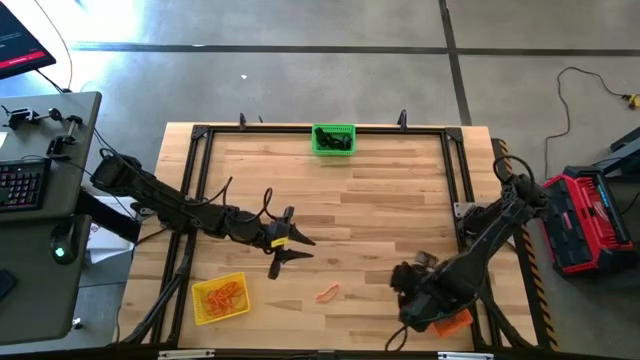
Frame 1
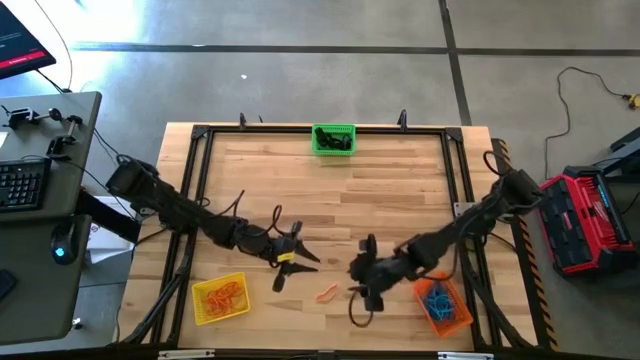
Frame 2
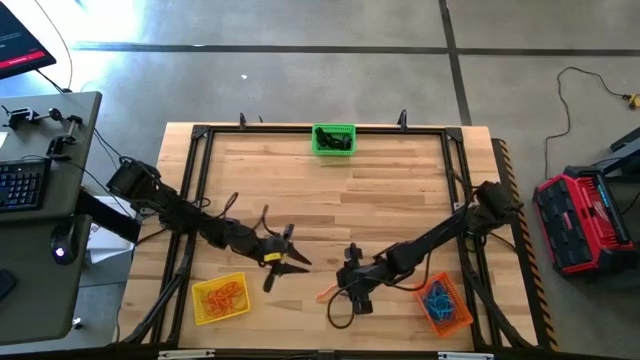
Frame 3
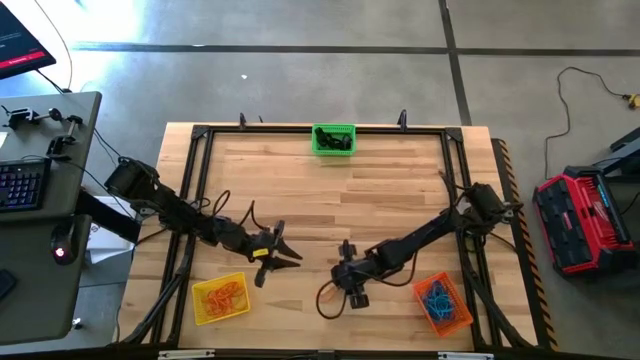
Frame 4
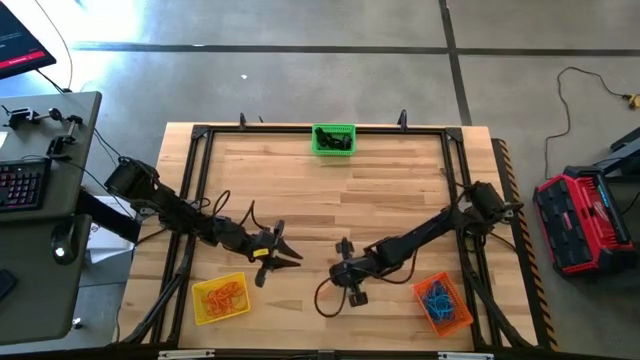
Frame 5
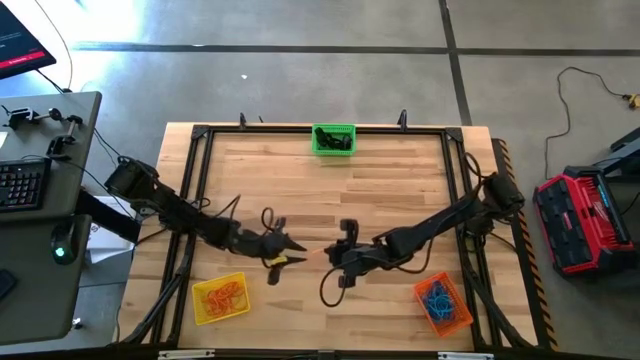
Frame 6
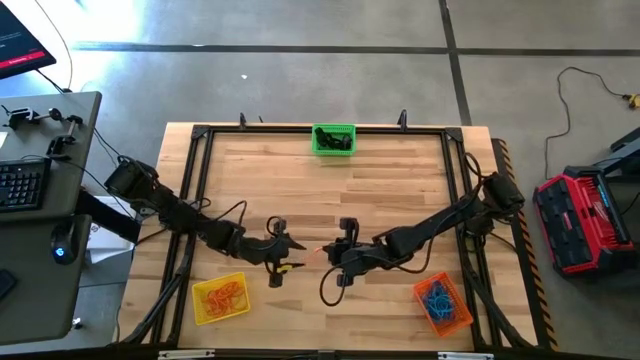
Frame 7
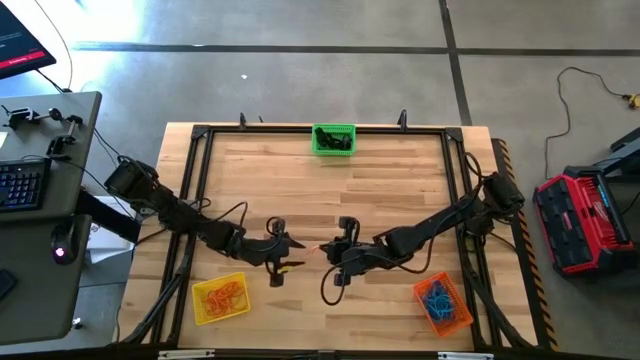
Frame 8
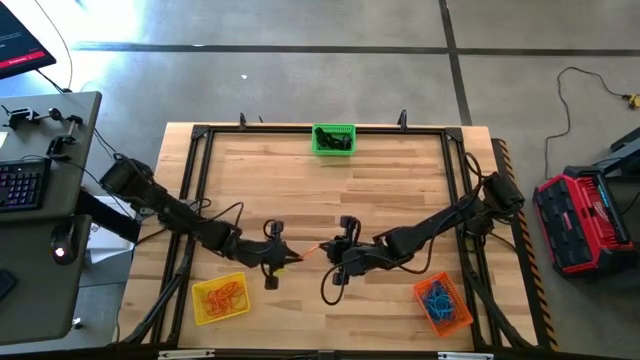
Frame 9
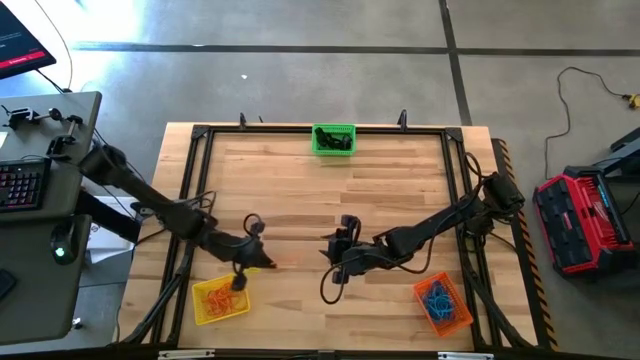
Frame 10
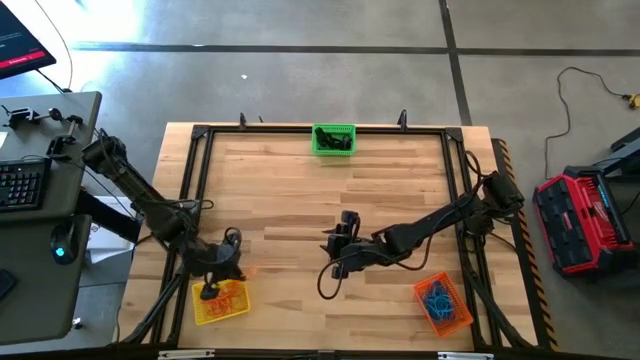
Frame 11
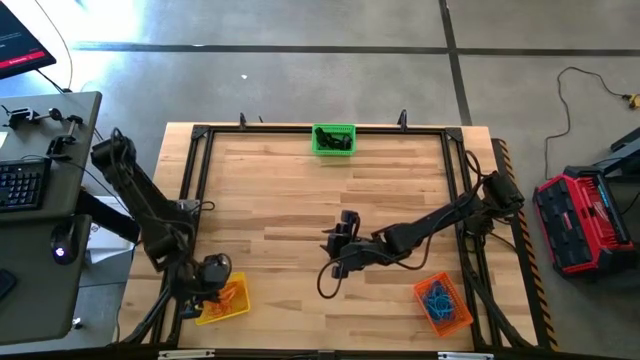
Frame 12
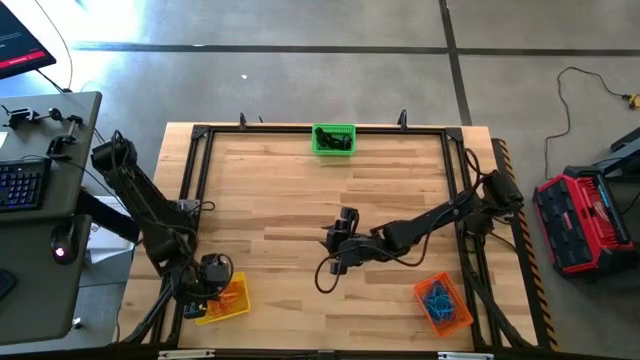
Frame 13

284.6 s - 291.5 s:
Task: Sort rubber bands into baskets
Put the orange rubber band into the yellow bin

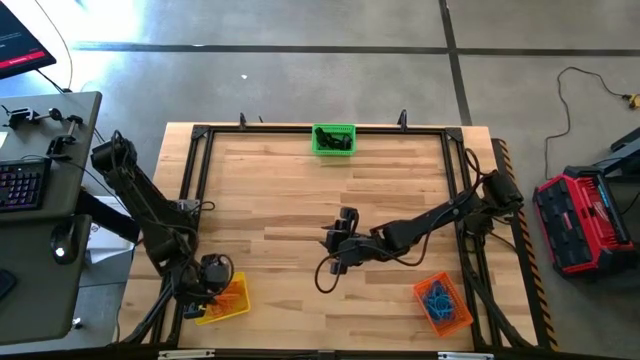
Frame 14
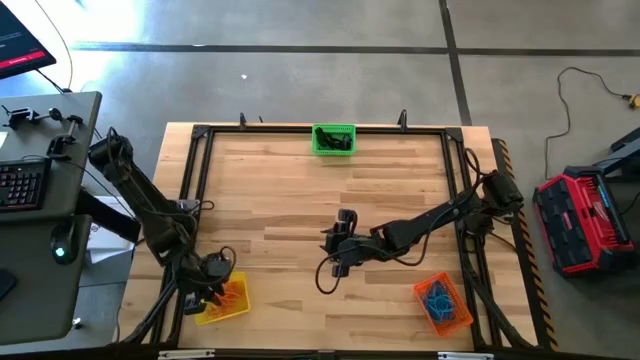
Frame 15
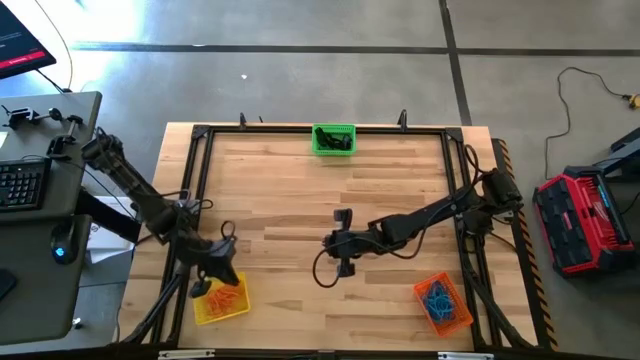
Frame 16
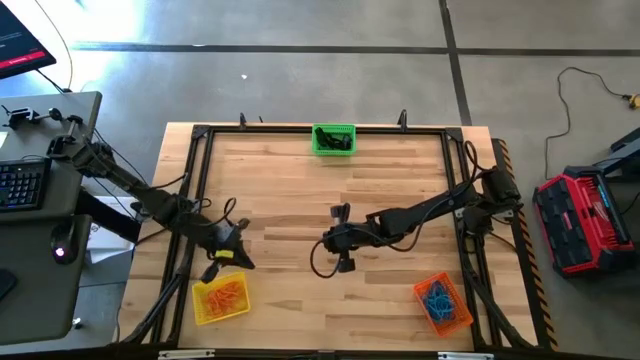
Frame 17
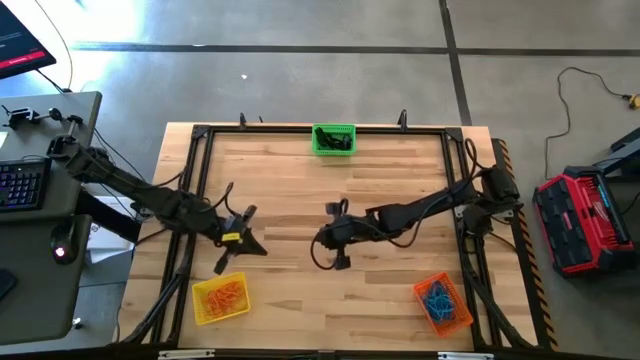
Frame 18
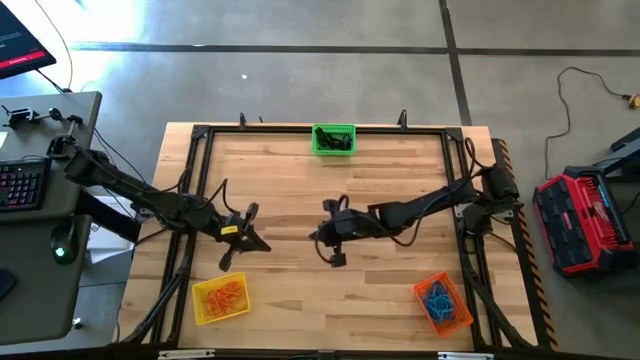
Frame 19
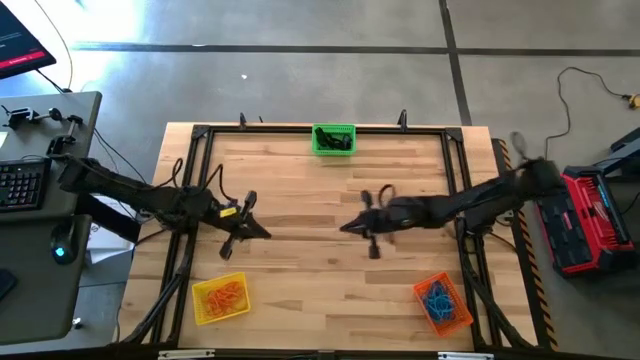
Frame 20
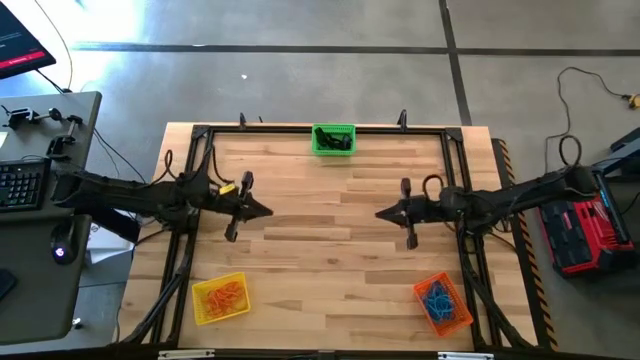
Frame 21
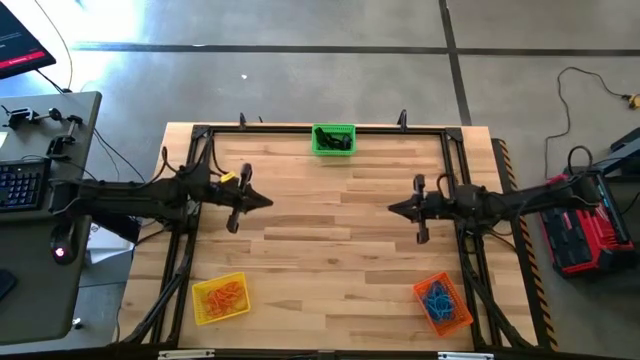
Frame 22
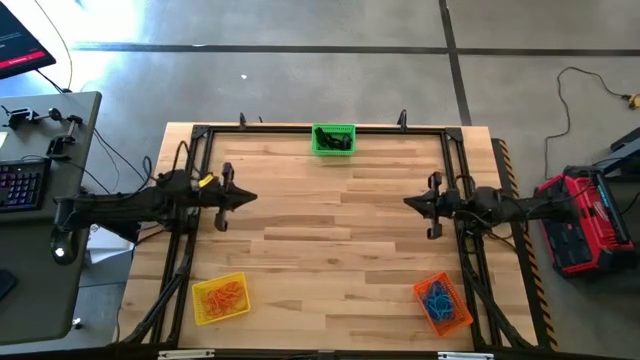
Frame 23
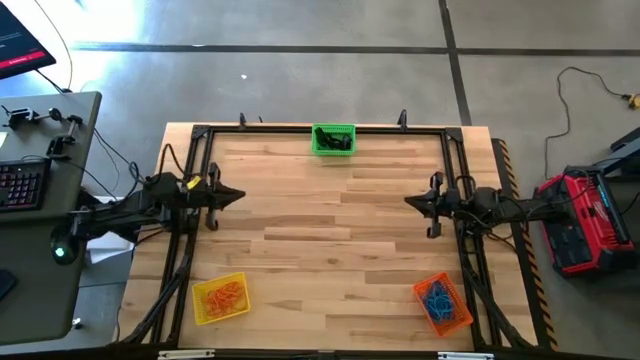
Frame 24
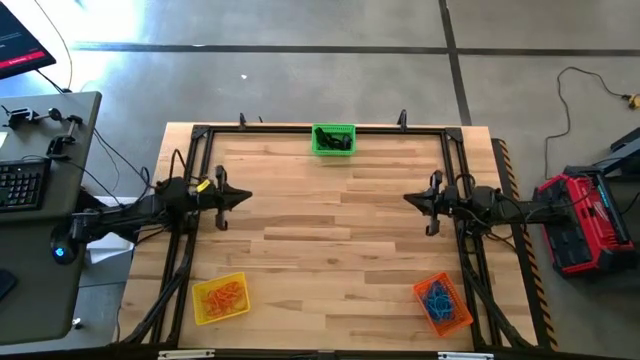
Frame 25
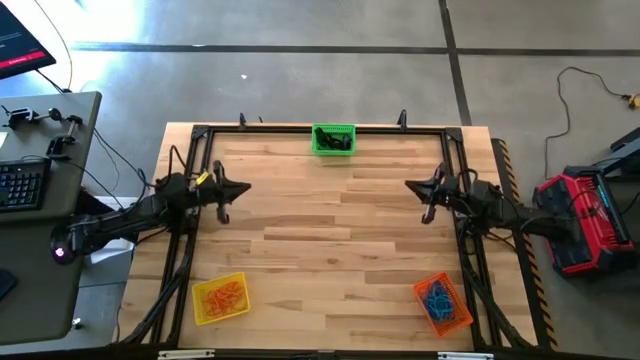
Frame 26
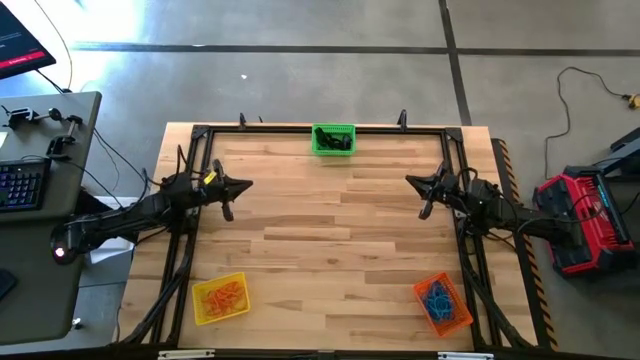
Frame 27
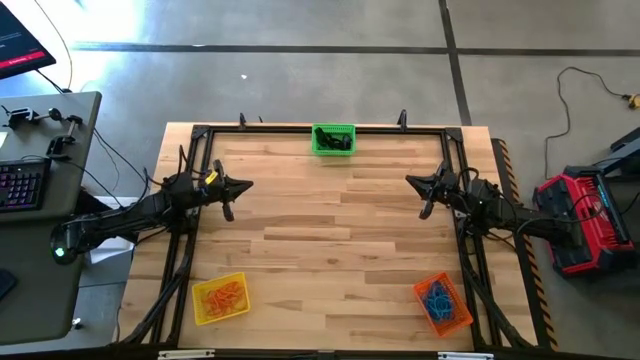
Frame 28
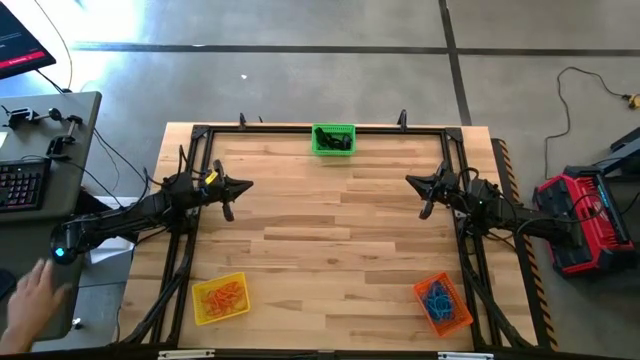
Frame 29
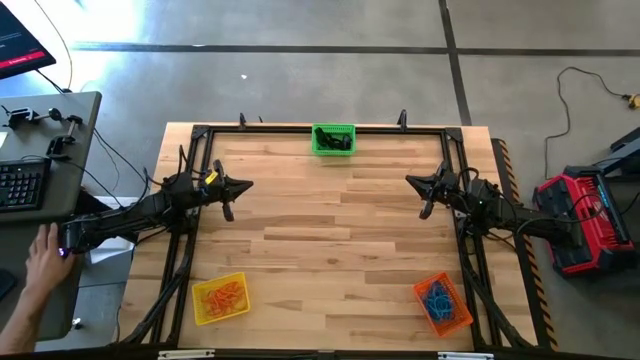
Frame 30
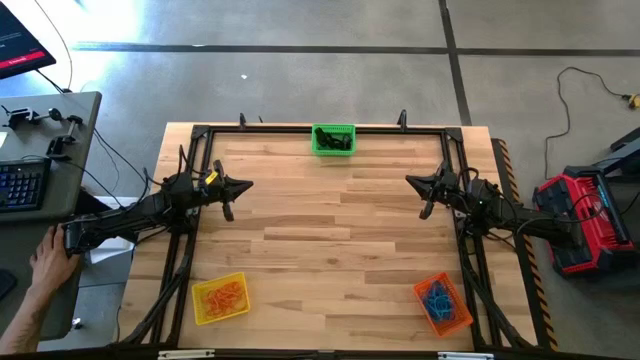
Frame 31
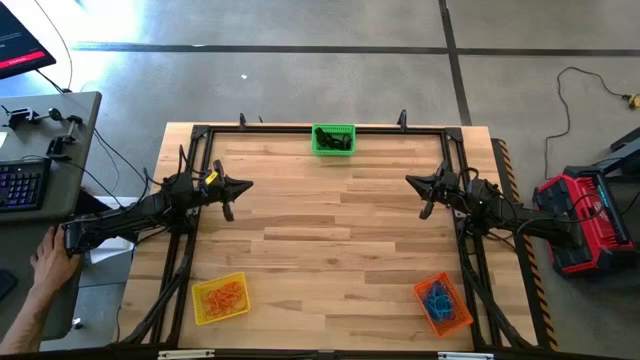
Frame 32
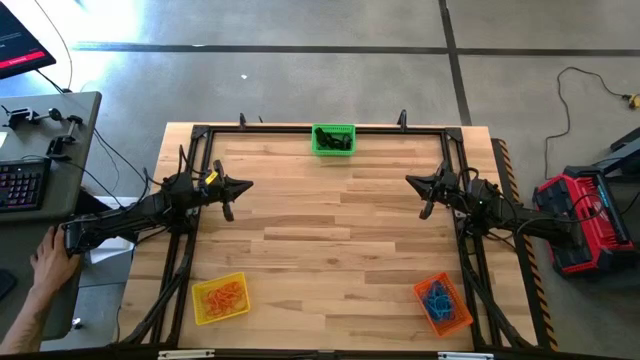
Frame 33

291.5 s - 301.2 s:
Return to Home Position

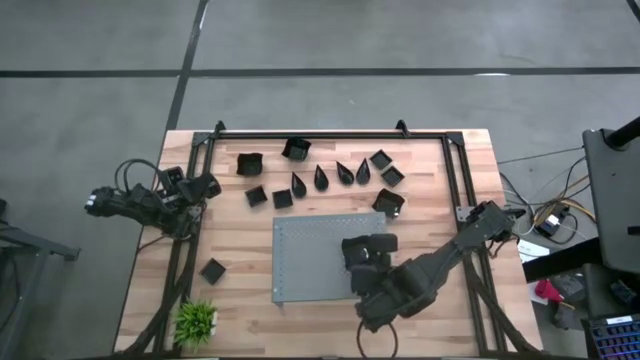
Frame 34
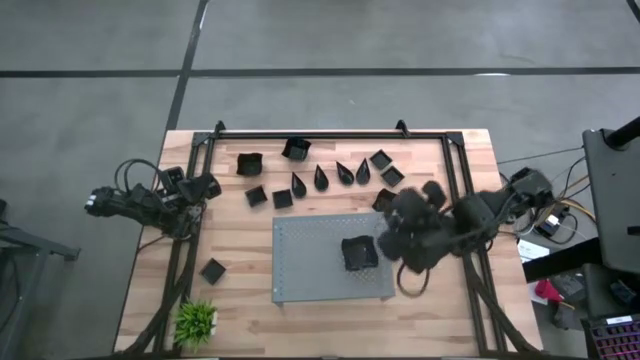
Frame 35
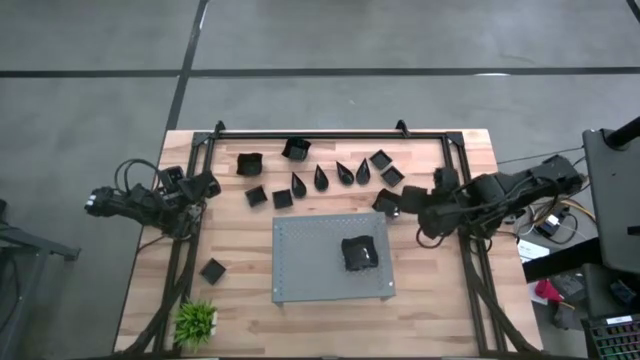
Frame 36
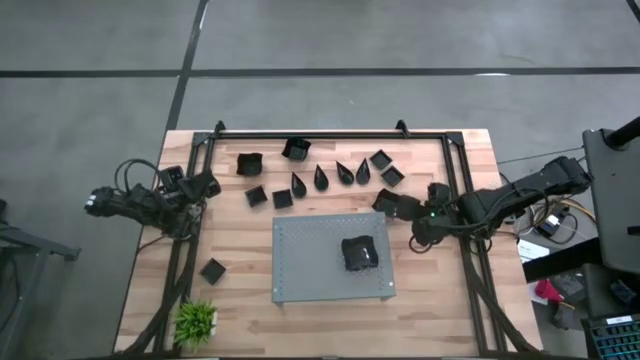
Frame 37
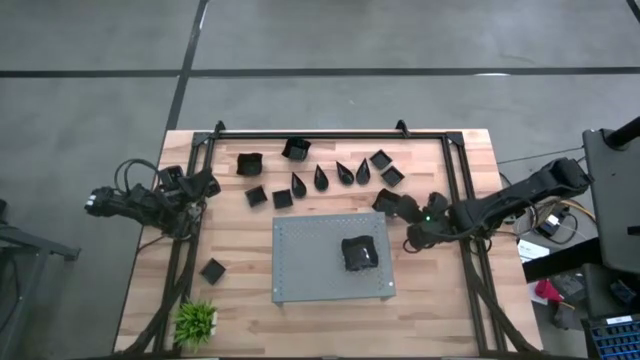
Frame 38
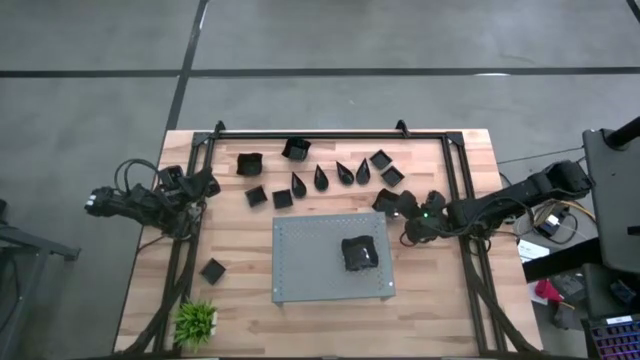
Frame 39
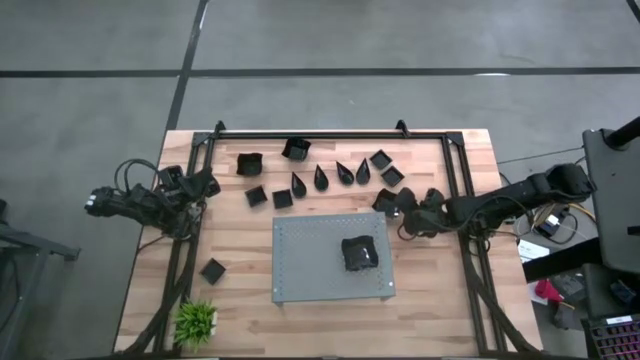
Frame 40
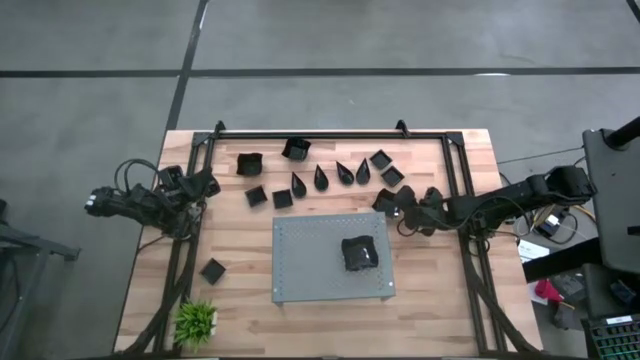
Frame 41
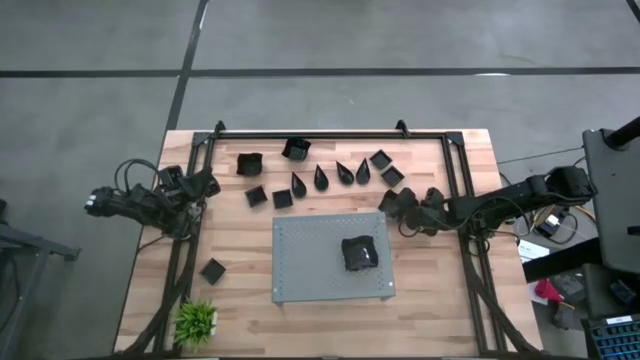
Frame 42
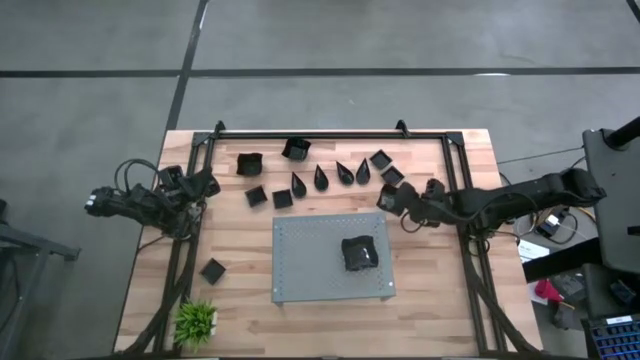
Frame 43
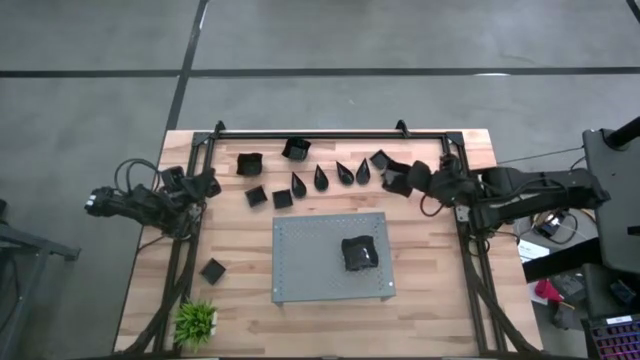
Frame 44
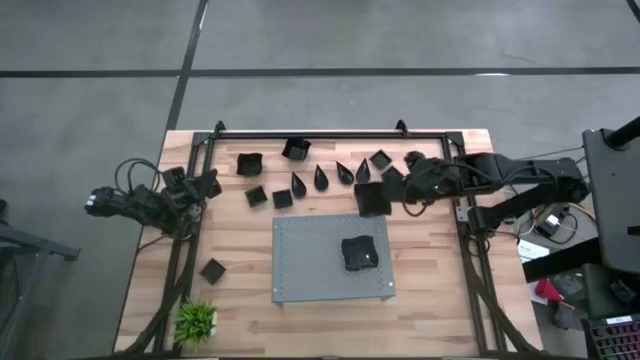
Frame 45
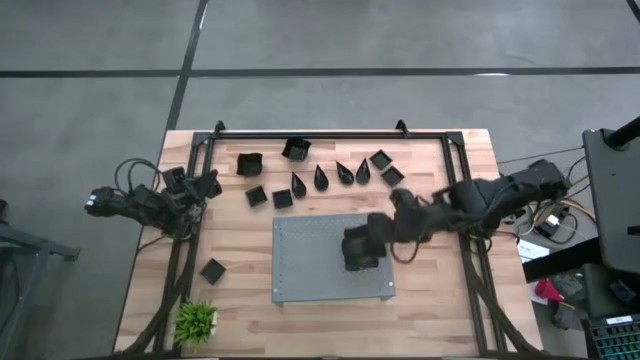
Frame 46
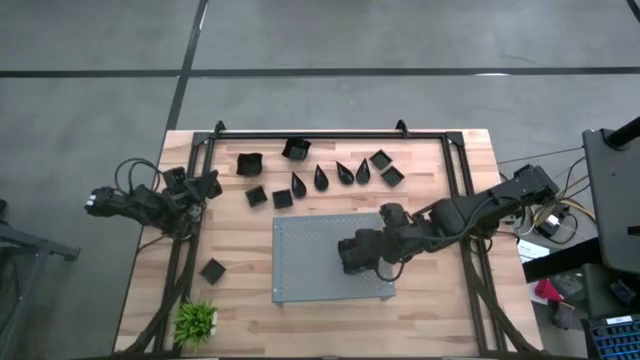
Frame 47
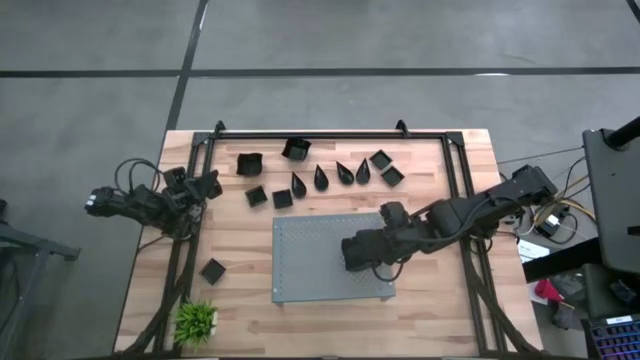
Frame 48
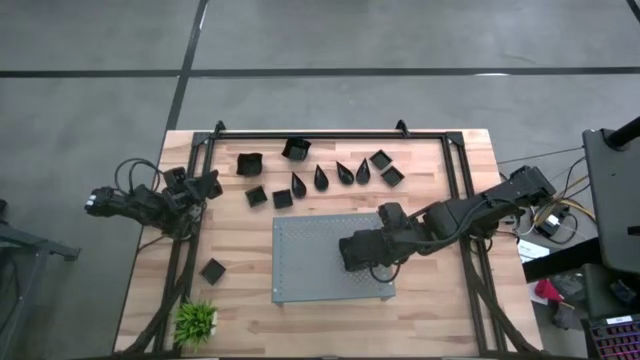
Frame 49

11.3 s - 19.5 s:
Task: Pick & Place Mini shaped plates
Stack the distorted square plate on top of the other distorted square plate on the shelf
